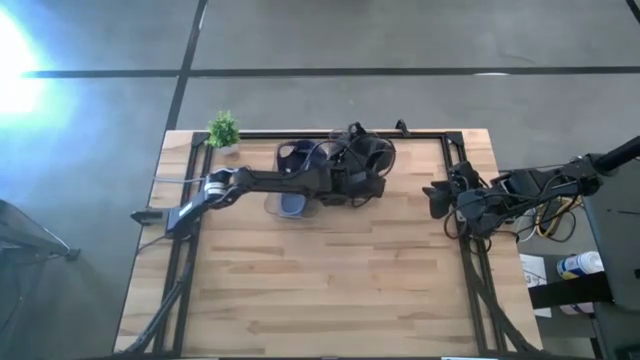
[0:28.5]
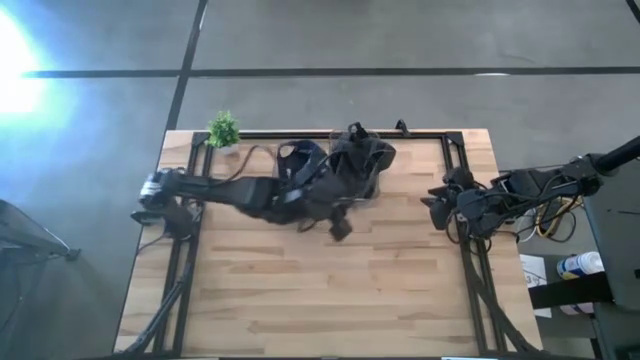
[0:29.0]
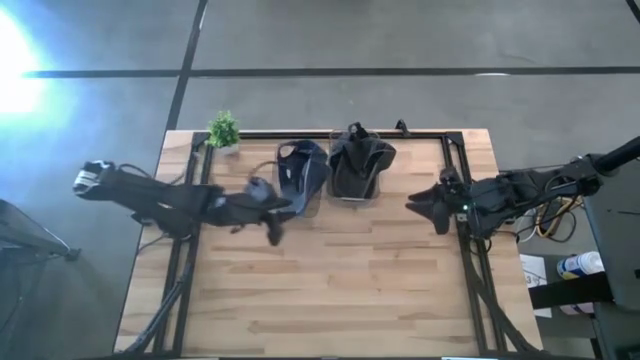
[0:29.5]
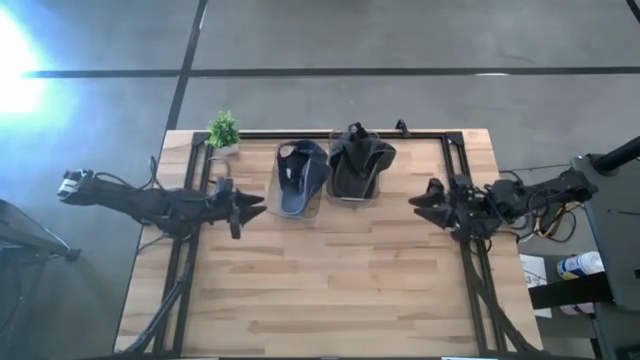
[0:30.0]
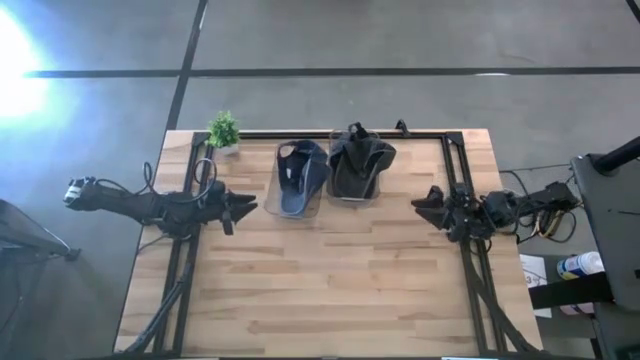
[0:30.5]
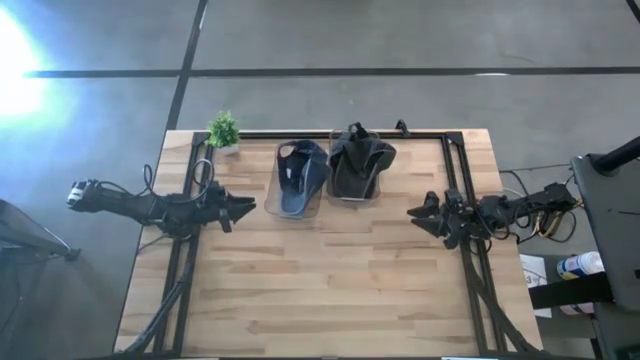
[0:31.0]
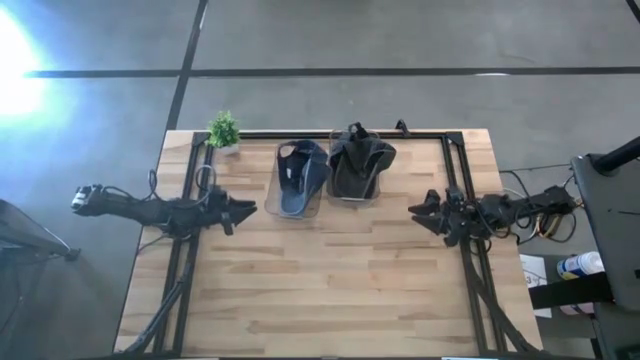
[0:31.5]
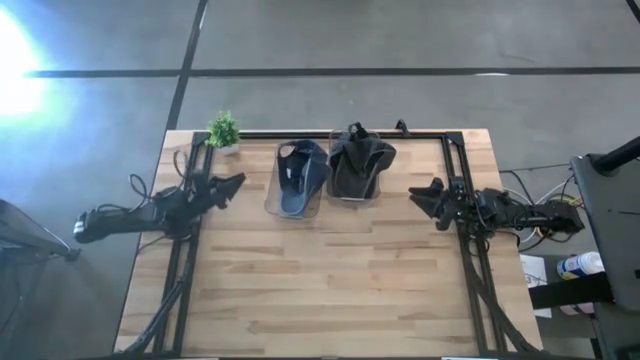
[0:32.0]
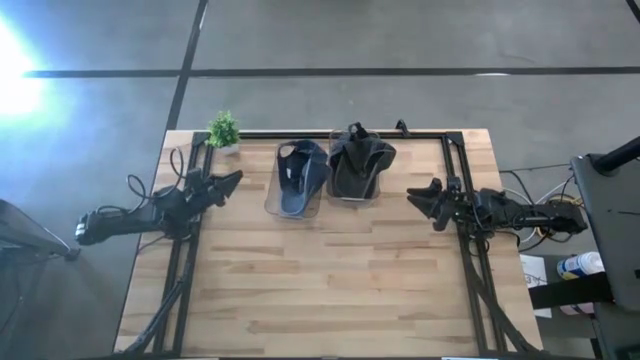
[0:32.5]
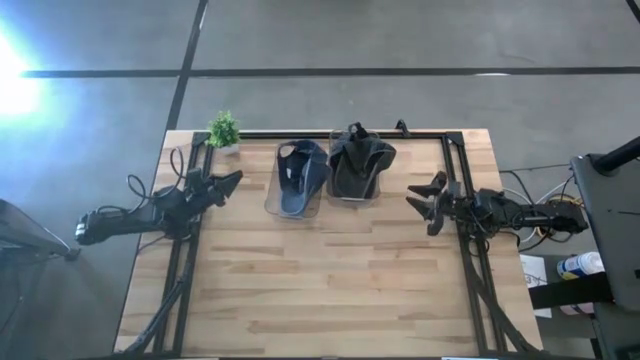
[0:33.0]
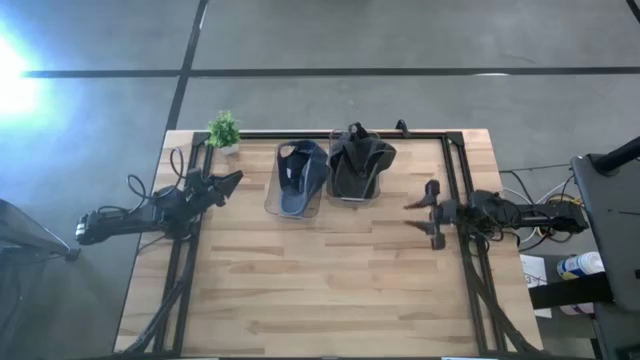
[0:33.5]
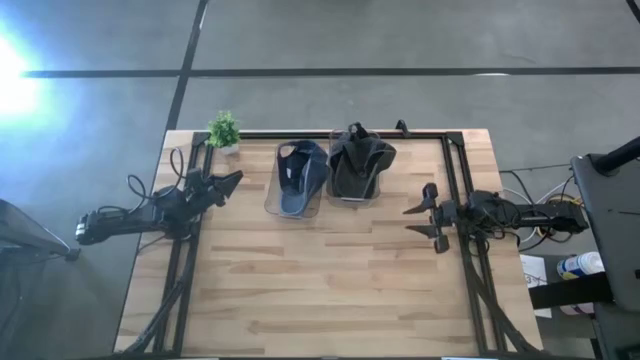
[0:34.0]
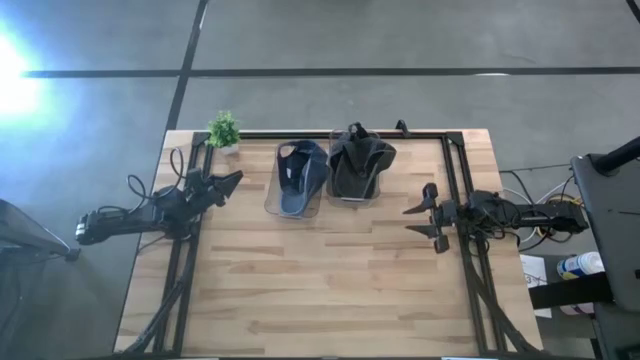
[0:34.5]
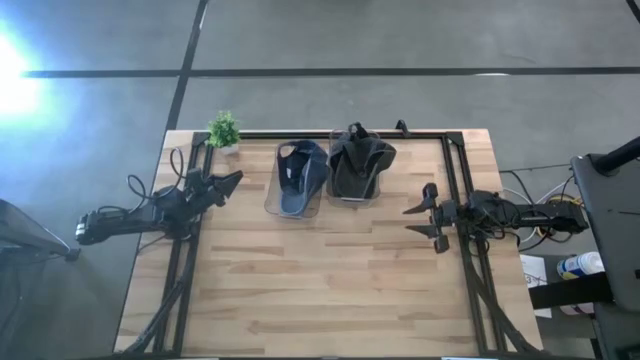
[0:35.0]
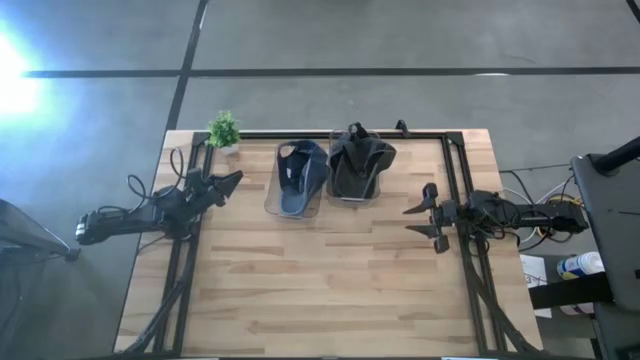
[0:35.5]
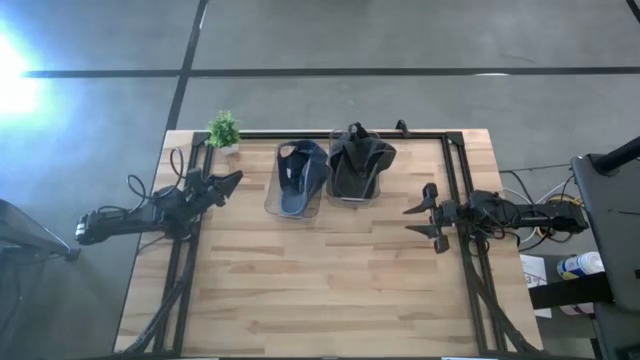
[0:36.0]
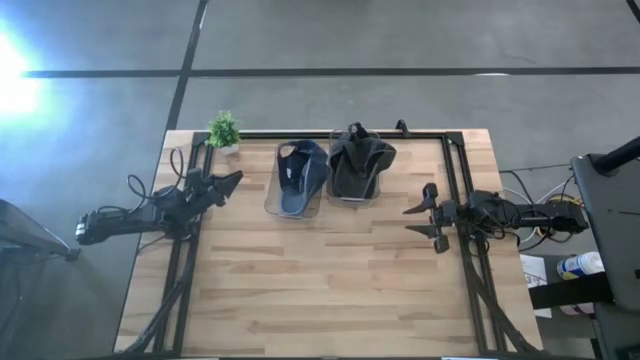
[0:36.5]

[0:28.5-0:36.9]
Task: Pick & Place hat
Return to Home Position

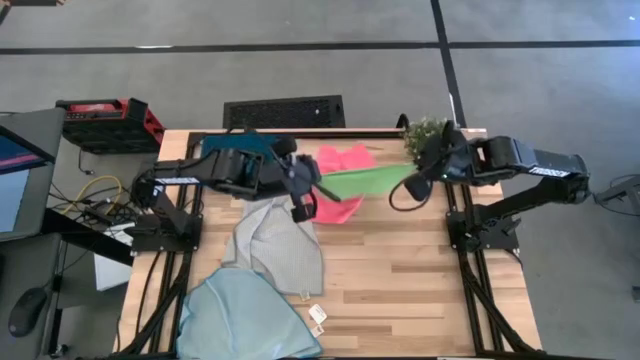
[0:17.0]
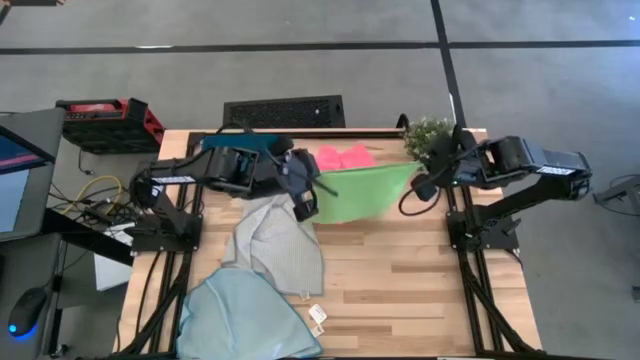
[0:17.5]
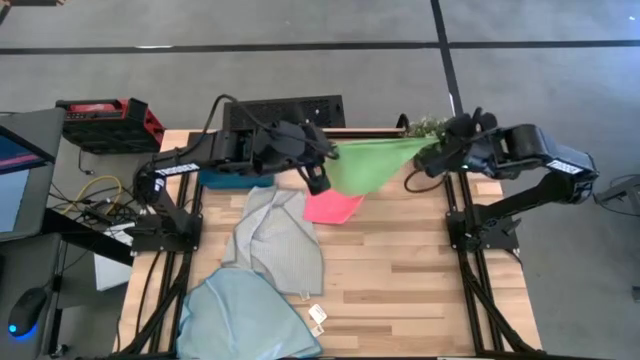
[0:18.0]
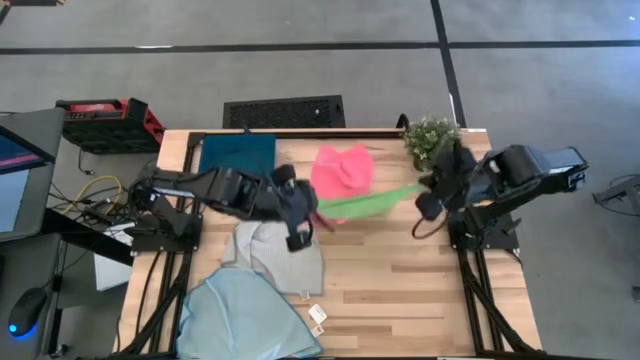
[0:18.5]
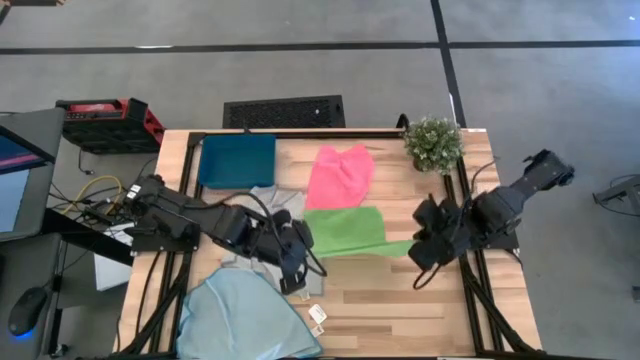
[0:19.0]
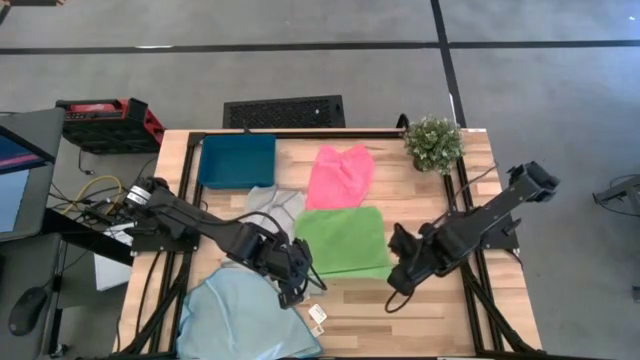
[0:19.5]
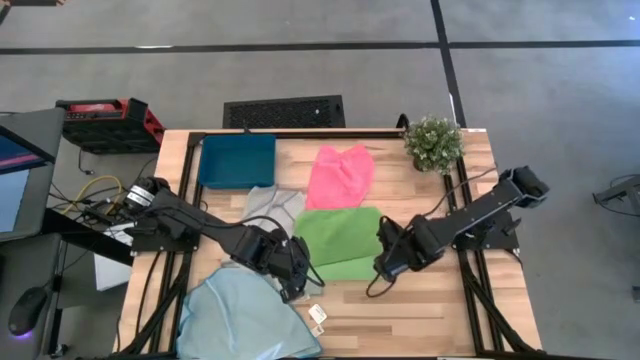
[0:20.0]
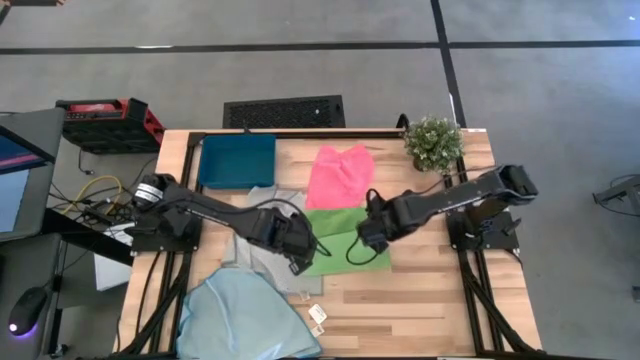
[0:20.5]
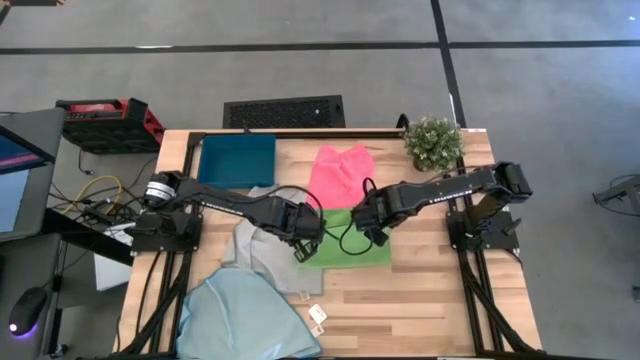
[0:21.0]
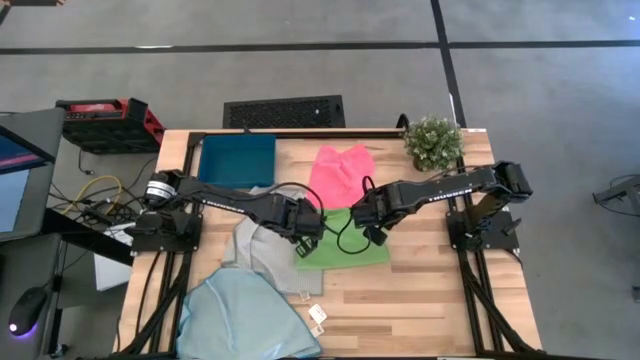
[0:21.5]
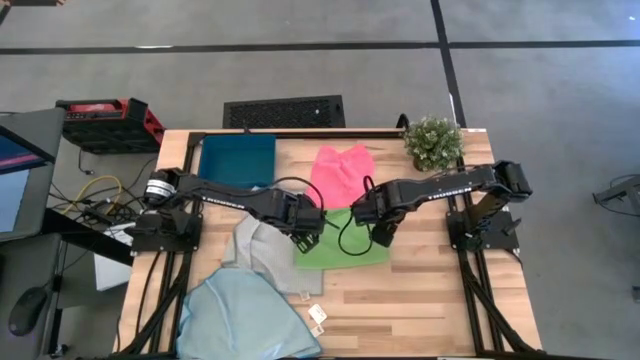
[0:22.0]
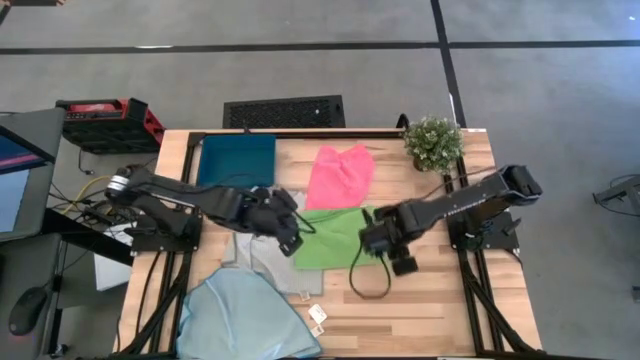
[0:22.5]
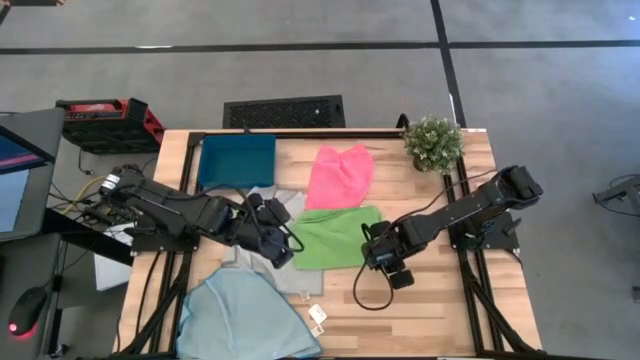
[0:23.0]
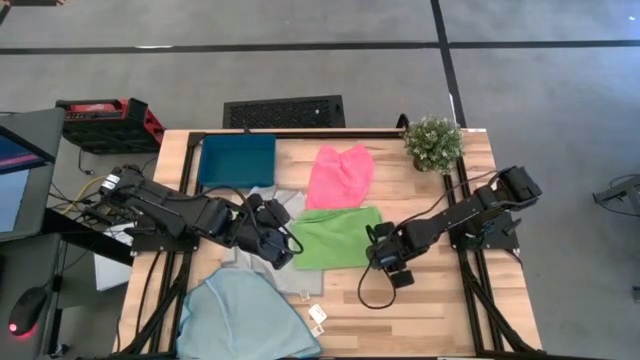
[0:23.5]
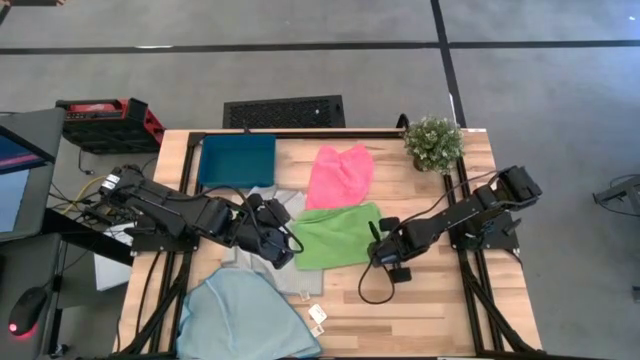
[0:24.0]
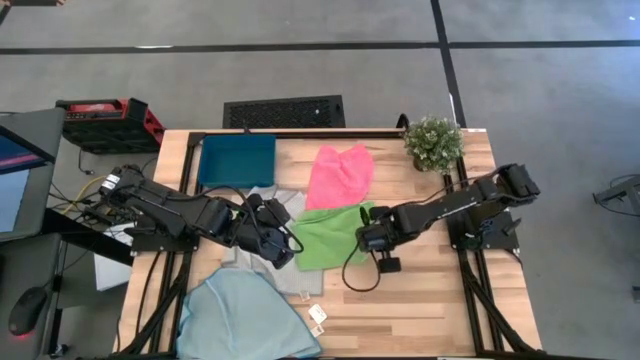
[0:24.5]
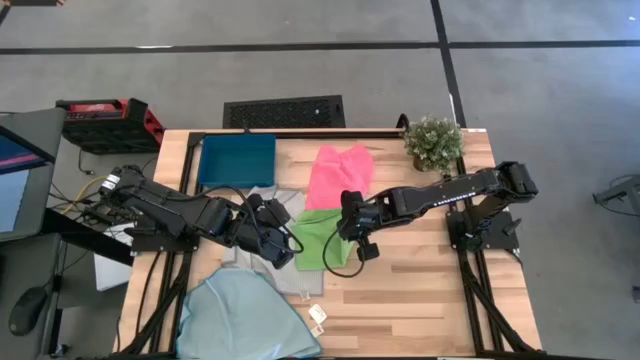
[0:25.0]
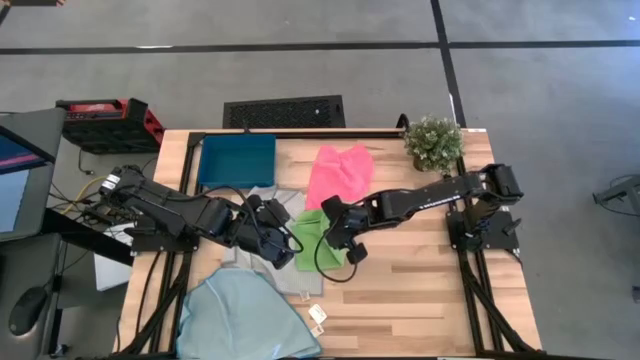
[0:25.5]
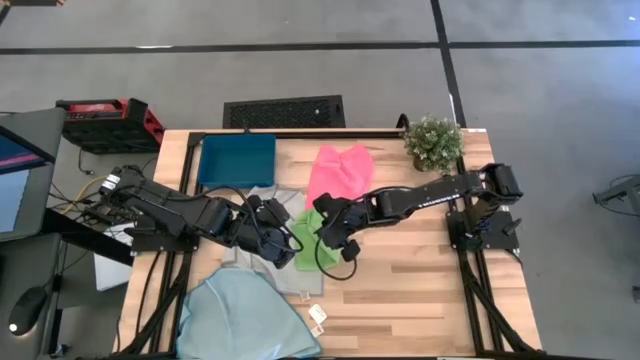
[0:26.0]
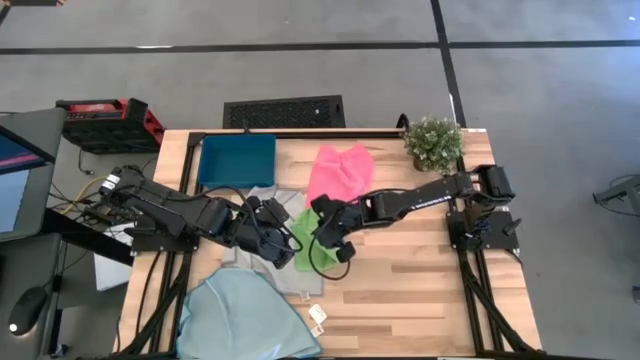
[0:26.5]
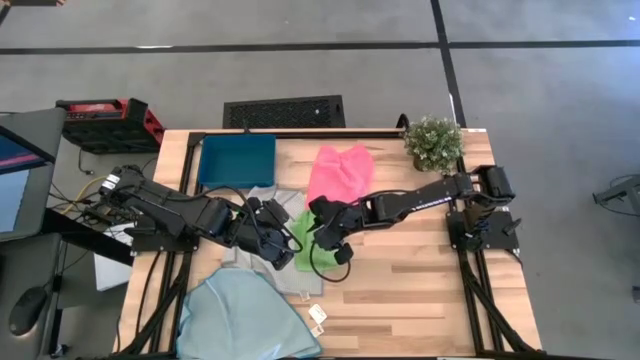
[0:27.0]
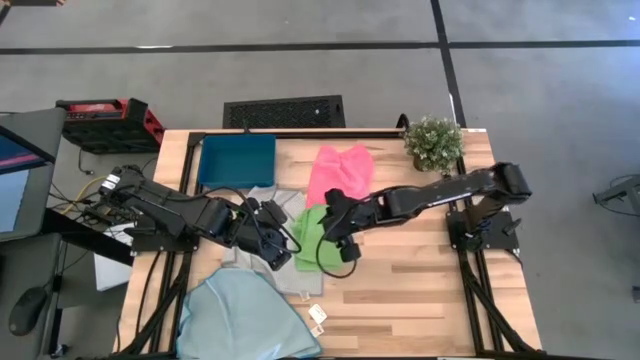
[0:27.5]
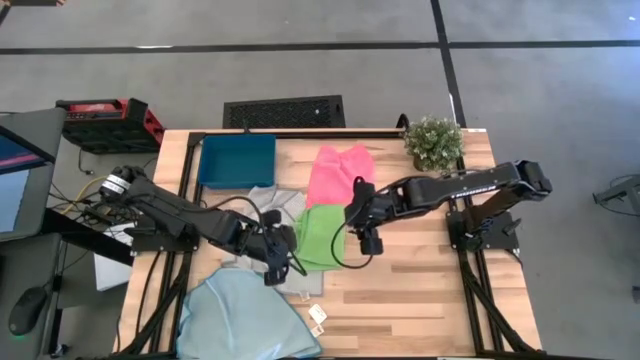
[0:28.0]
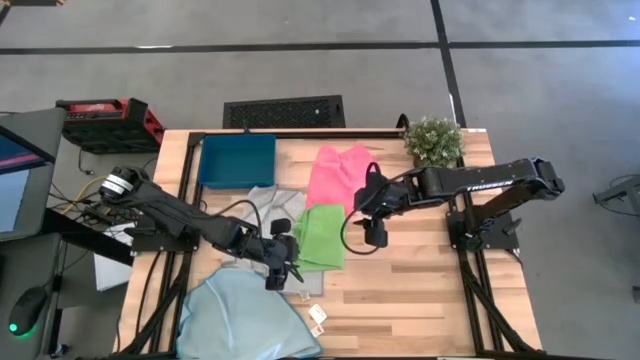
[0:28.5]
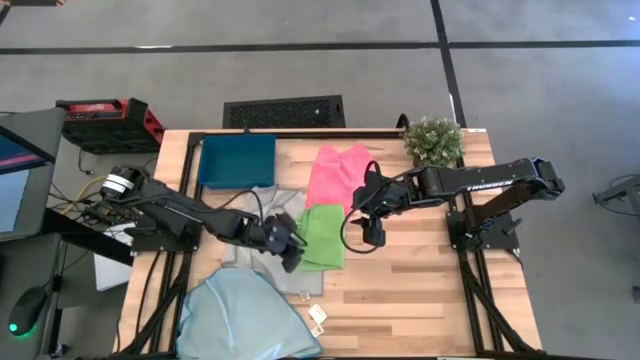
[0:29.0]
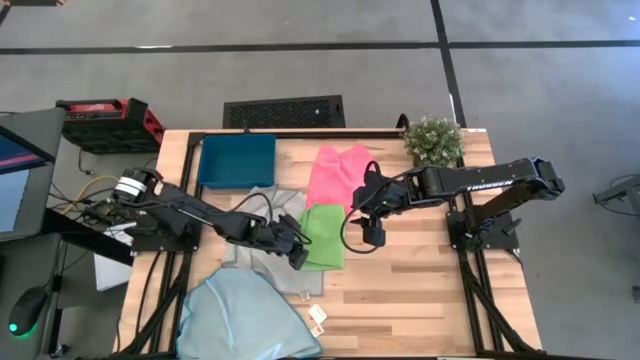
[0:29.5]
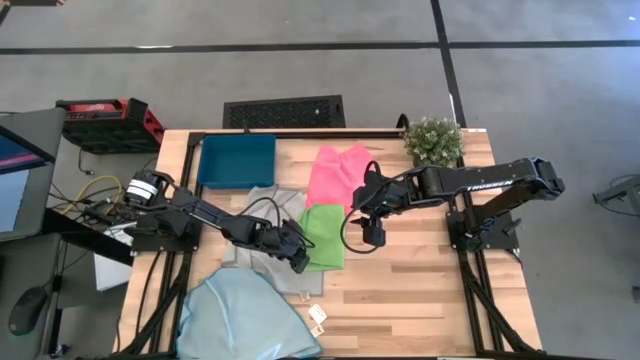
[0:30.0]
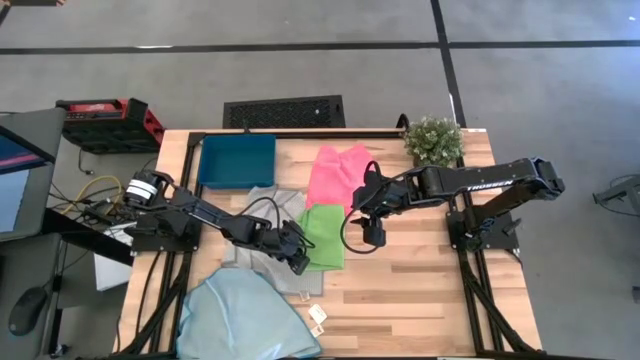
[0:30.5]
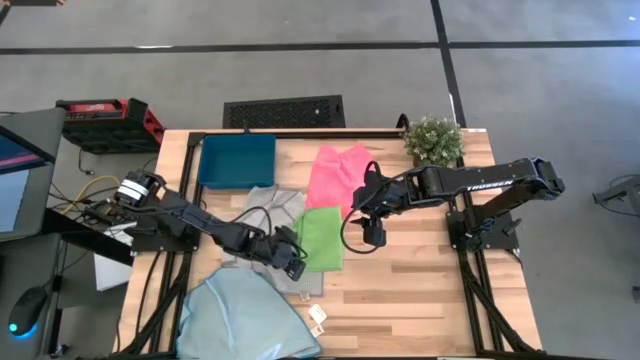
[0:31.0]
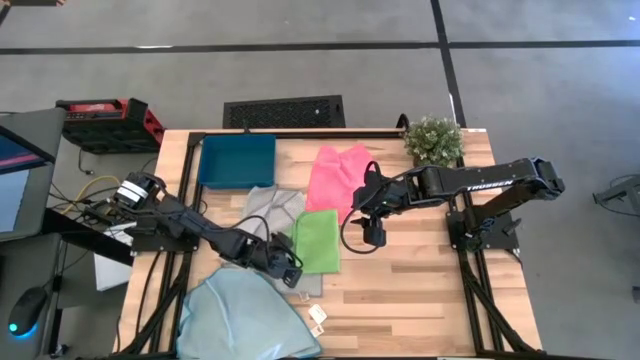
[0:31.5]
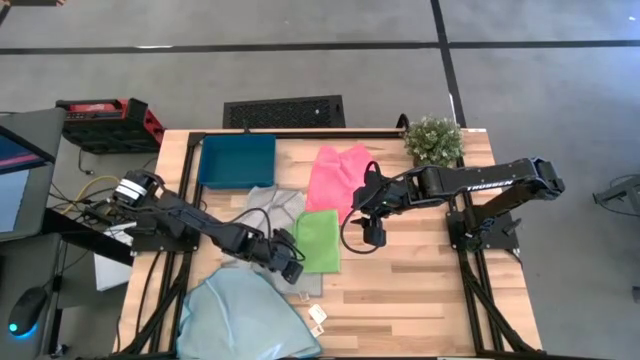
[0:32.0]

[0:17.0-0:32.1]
Task: Fold microfiber towels
Fold the green cloth
